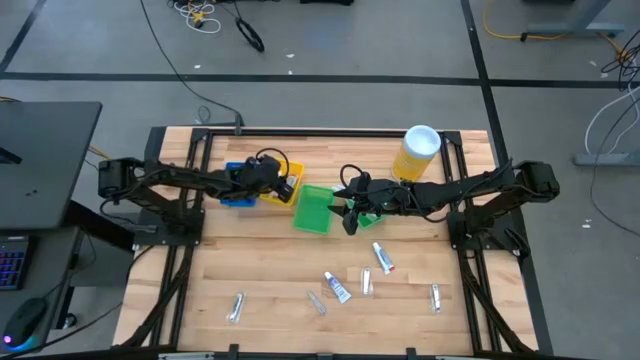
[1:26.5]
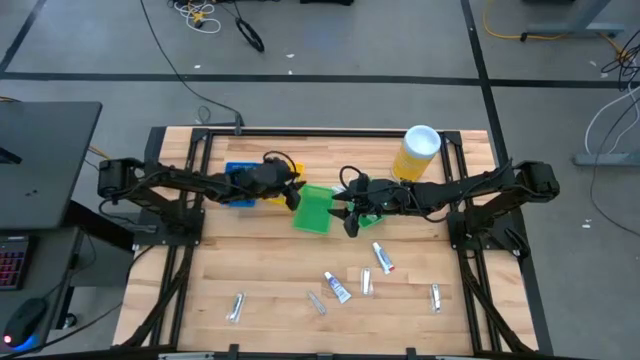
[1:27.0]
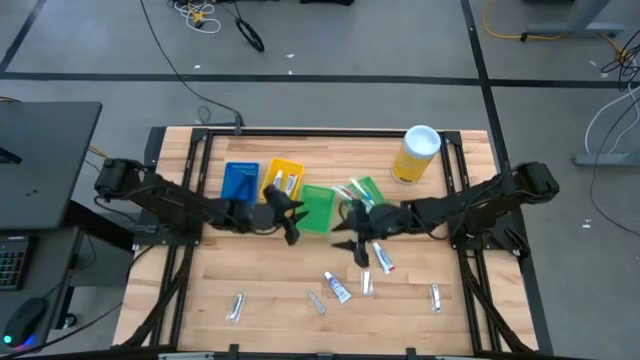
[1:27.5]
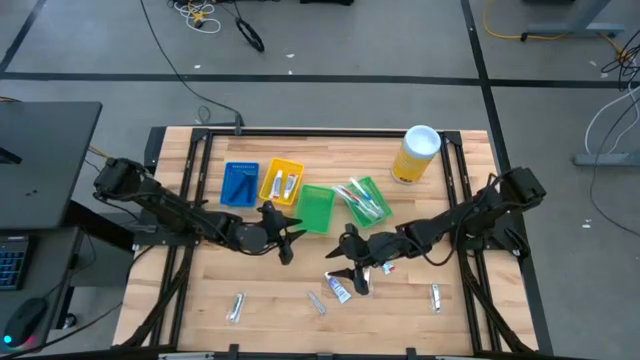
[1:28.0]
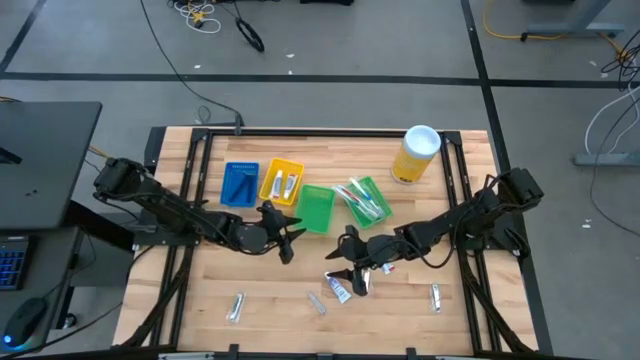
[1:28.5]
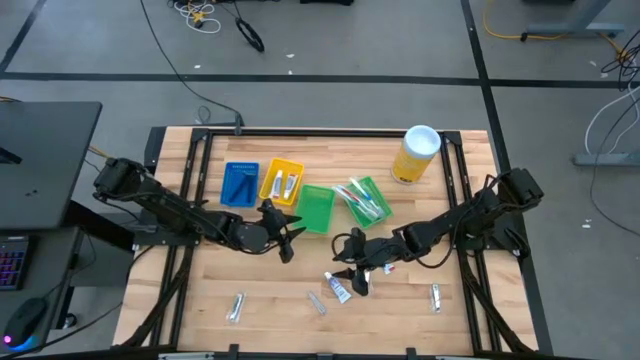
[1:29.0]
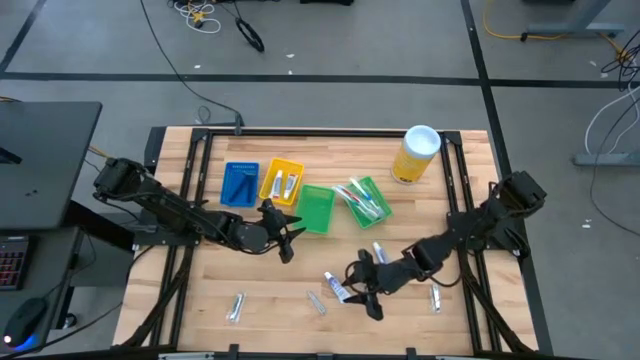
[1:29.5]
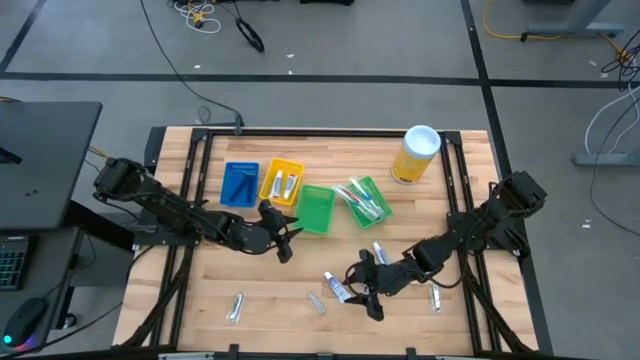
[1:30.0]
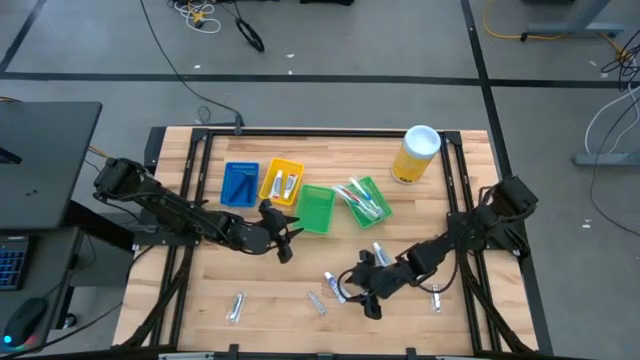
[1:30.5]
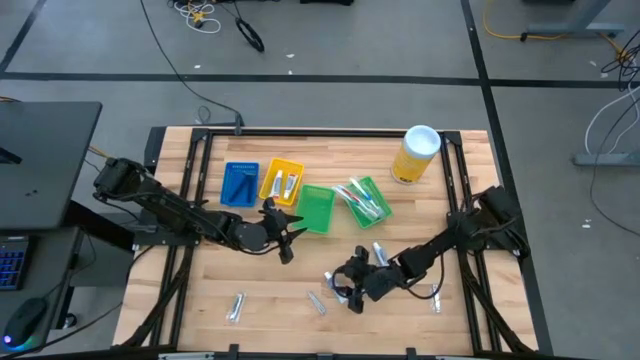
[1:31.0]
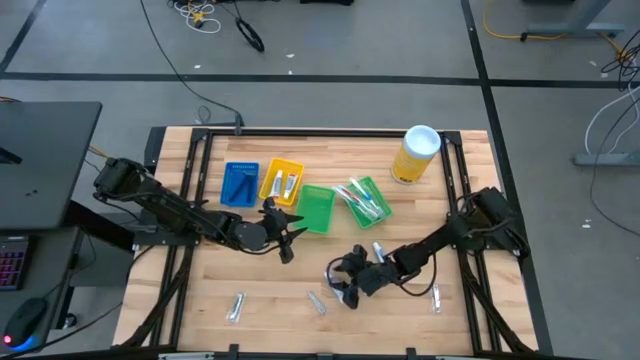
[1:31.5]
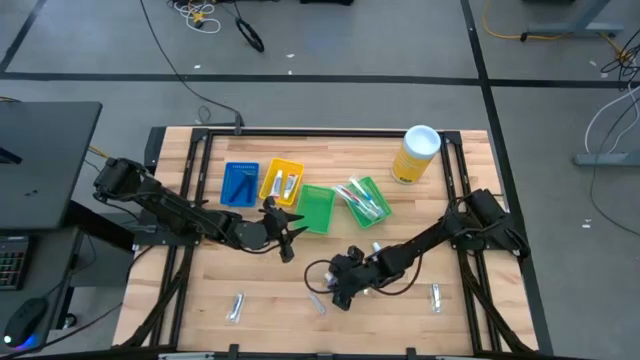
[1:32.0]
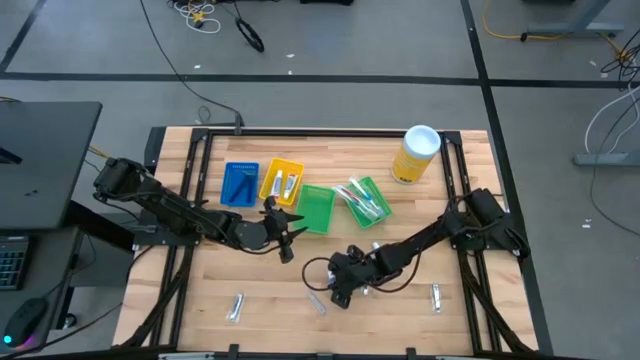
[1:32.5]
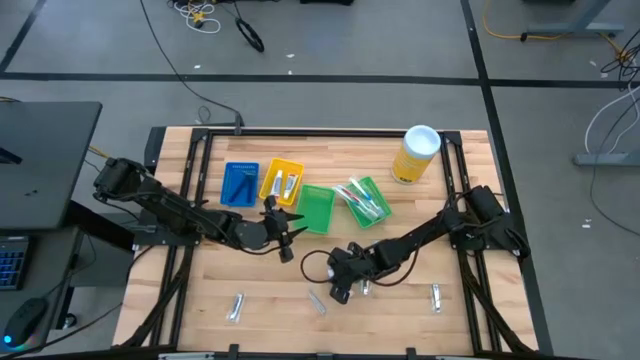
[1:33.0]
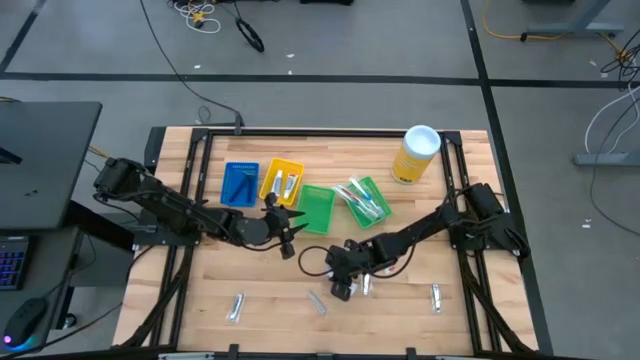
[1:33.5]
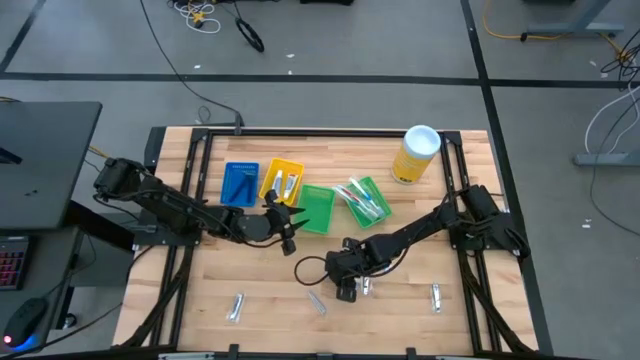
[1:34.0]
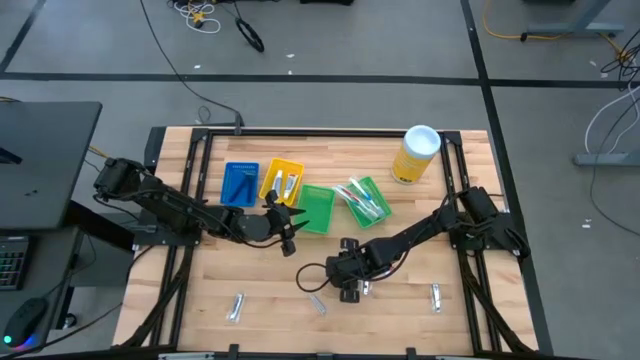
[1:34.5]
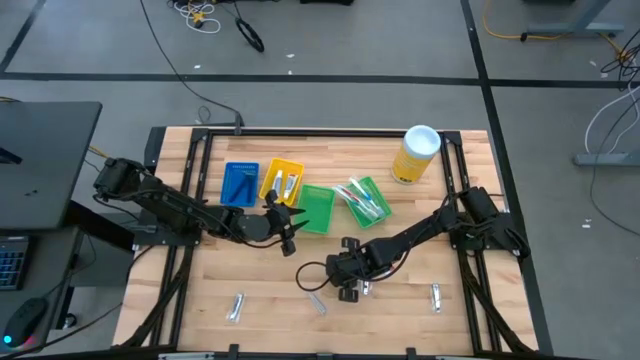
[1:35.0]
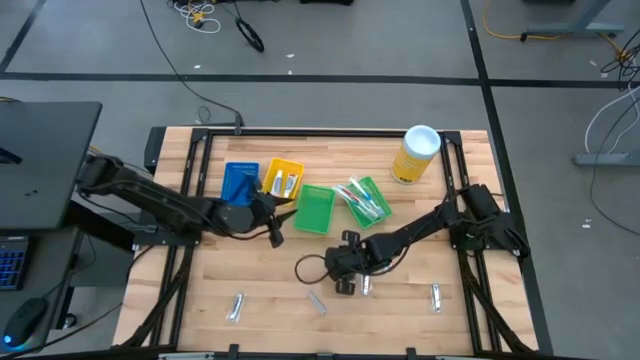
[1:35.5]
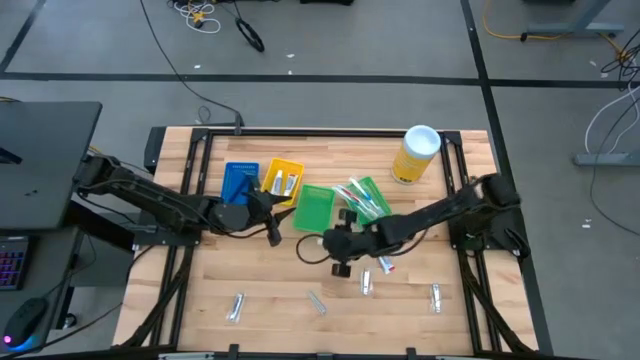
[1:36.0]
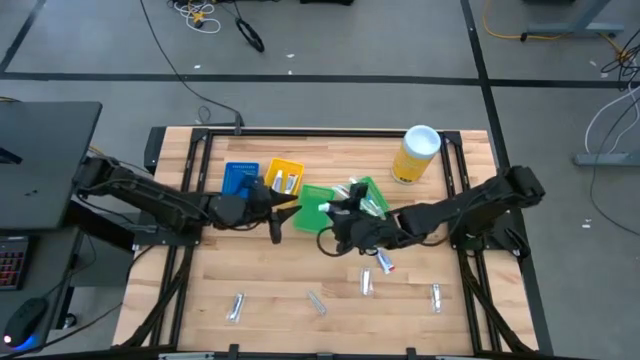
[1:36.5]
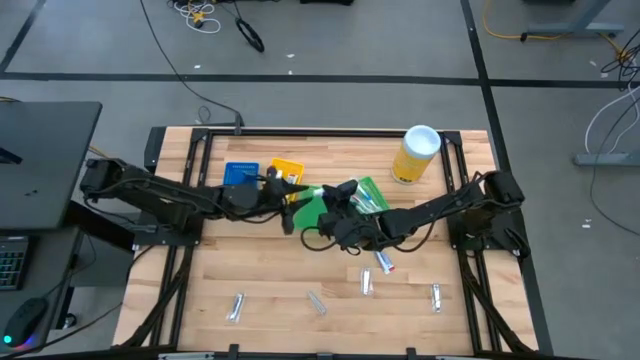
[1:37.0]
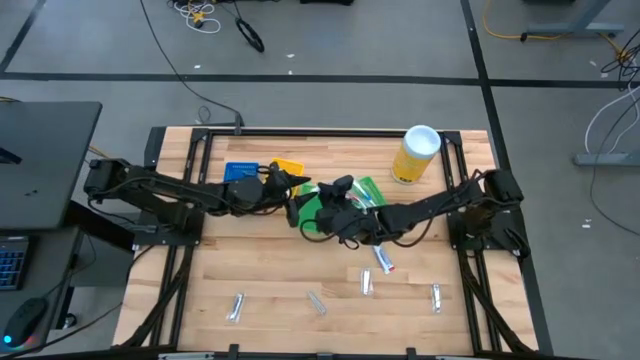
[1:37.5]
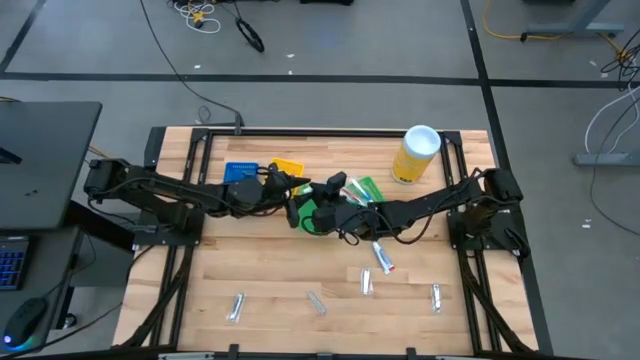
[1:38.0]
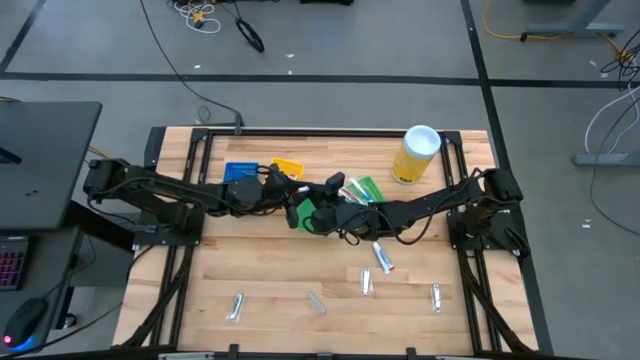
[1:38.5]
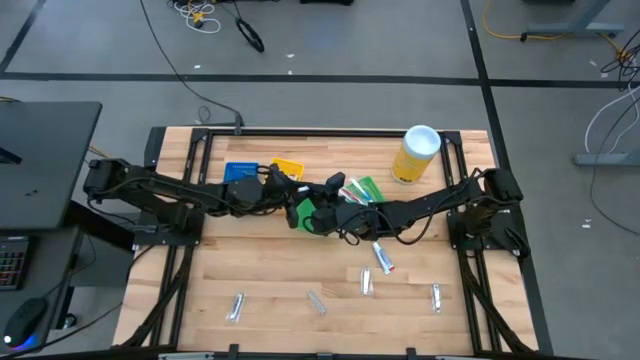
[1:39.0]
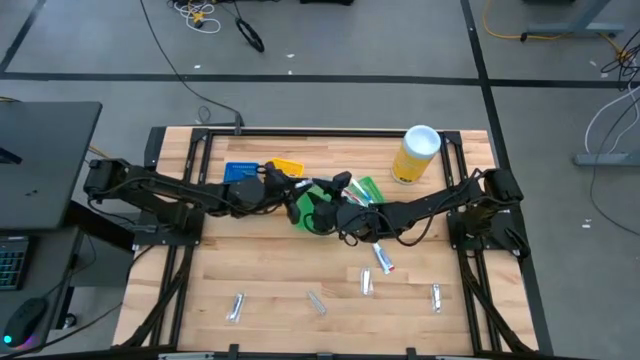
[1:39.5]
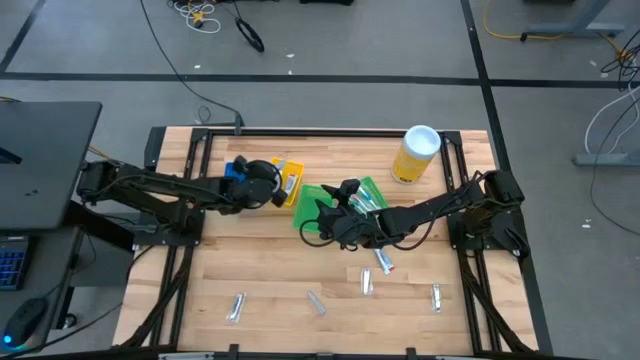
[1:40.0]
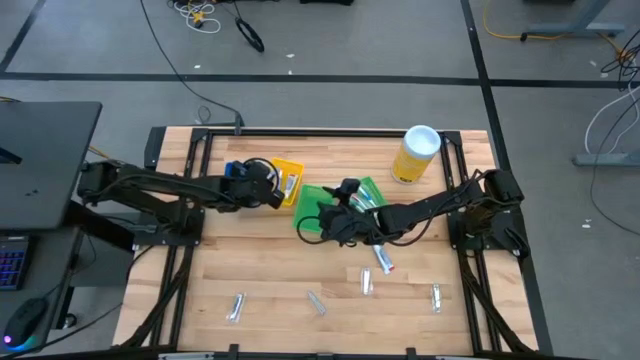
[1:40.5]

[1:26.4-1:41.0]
Task: Pick & Place Travel size toiletries
Put the white toothpaste into the yellow bin

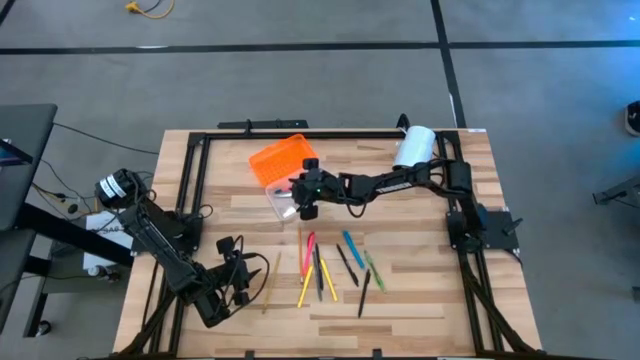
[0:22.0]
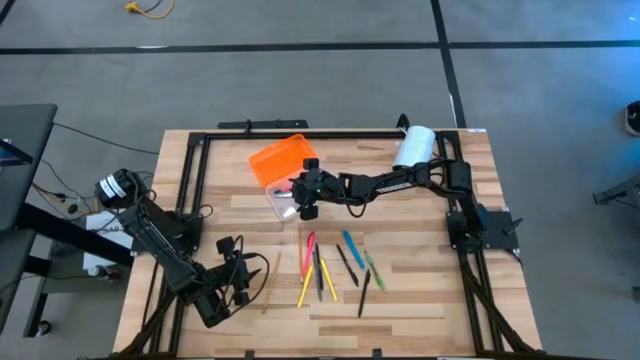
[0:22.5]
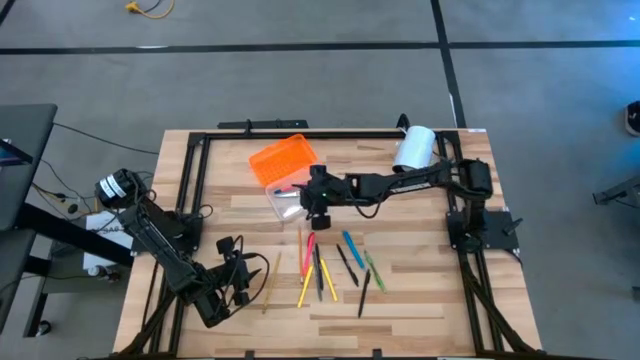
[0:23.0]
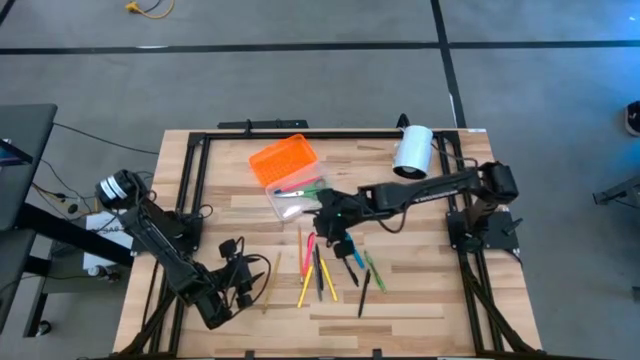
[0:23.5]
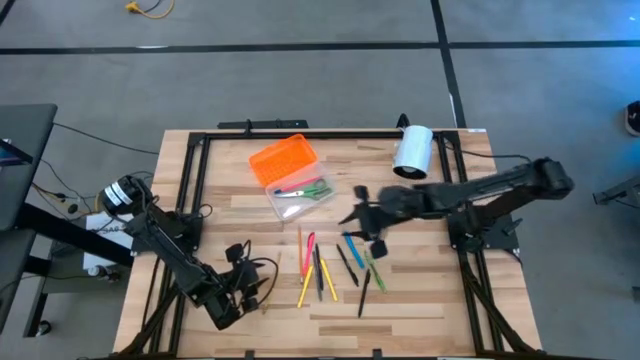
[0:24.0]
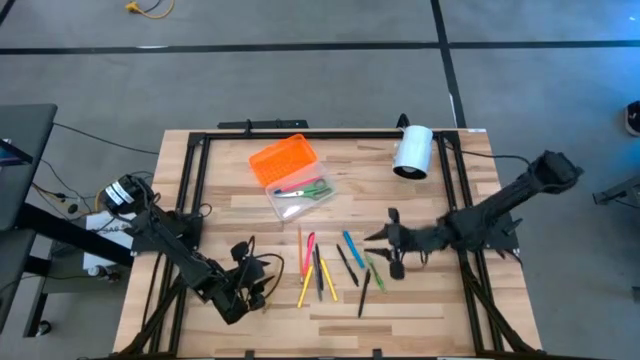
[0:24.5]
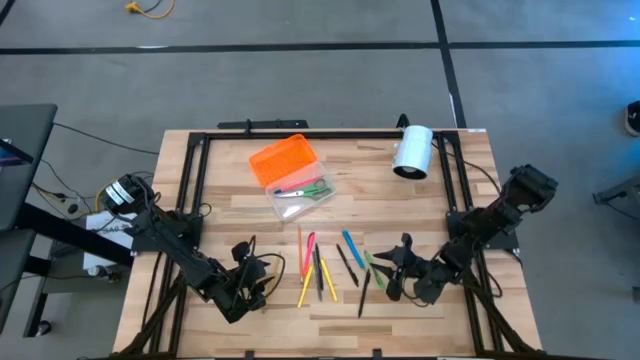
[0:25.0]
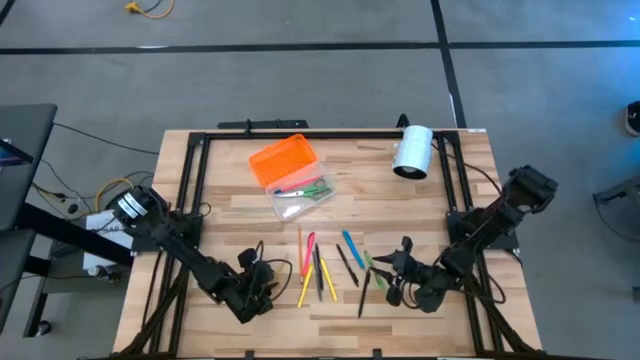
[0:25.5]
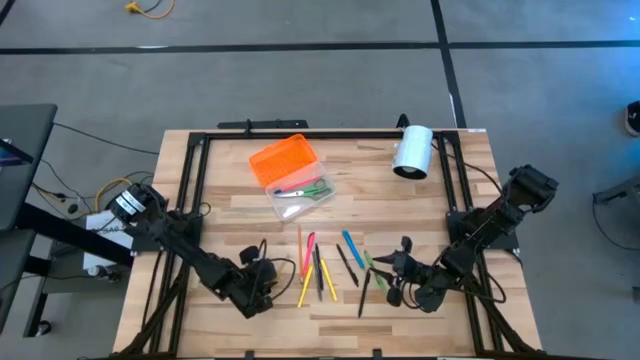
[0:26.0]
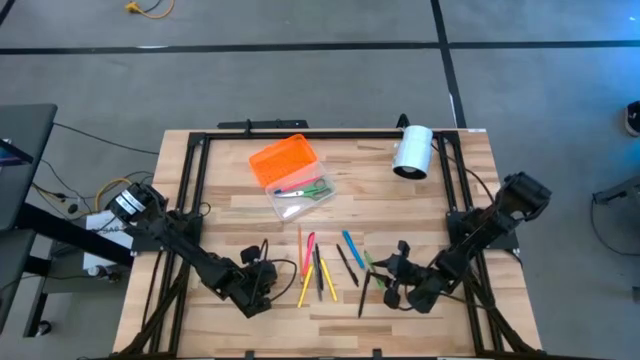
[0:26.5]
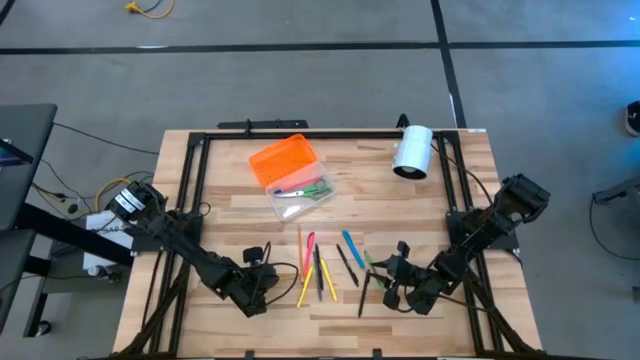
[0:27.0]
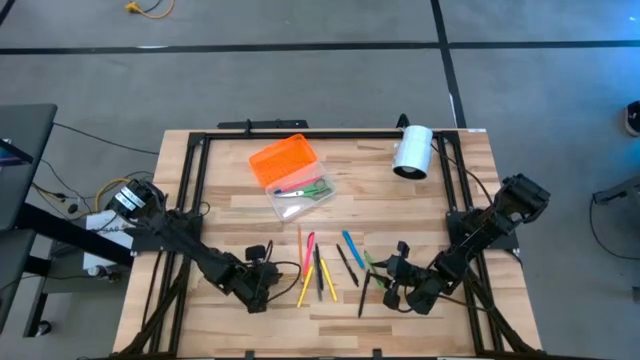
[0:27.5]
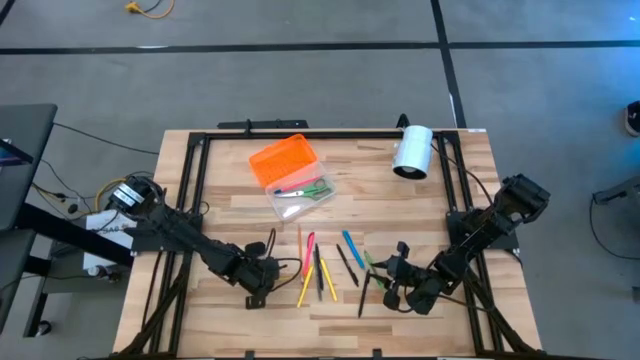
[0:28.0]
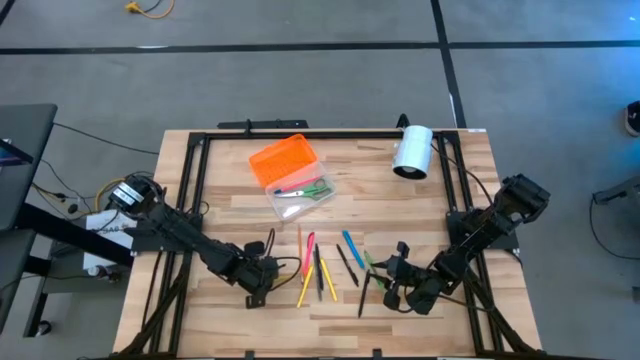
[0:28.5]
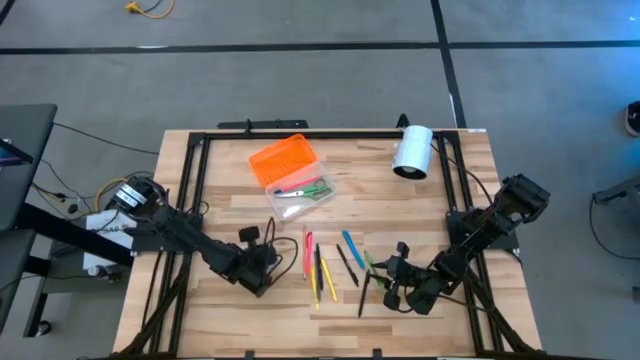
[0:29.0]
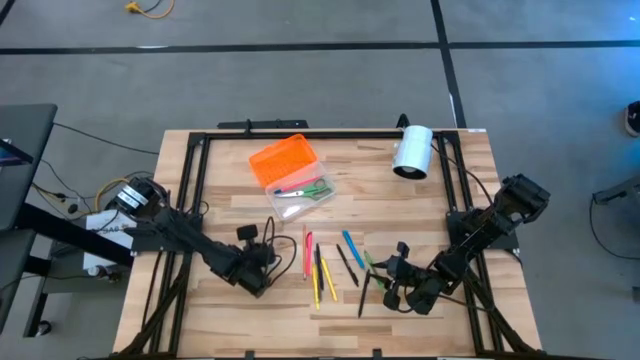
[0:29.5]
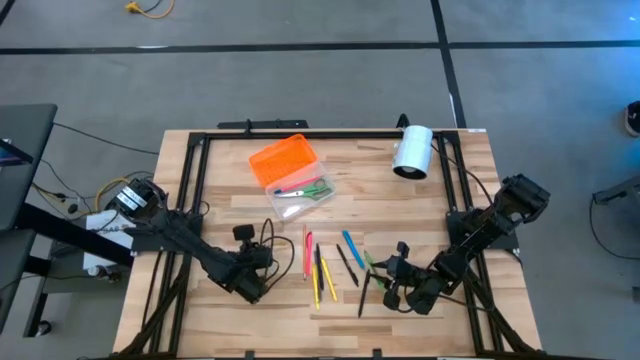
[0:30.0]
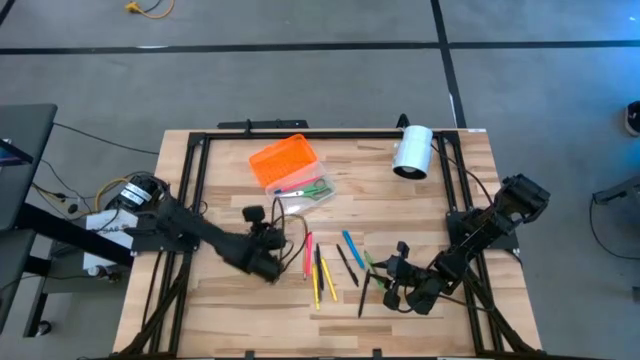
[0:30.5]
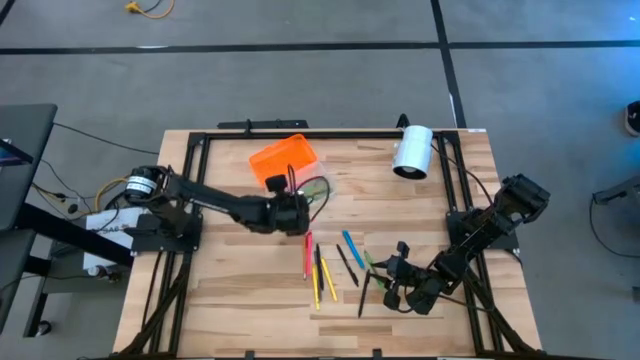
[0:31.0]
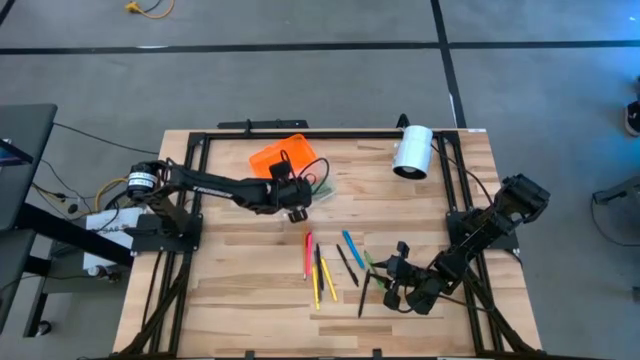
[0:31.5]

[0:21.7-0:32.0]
Task: Pick & place school supplies into a supply box
Put the yellow pencil into the supply box
